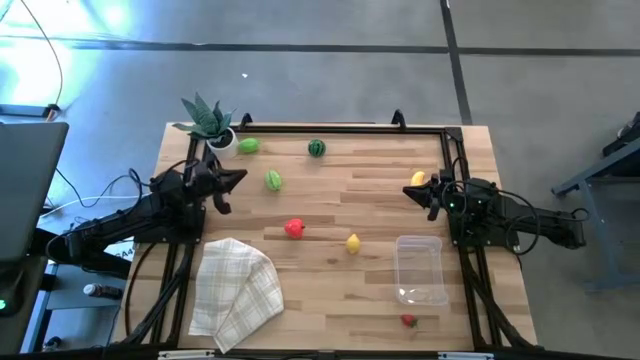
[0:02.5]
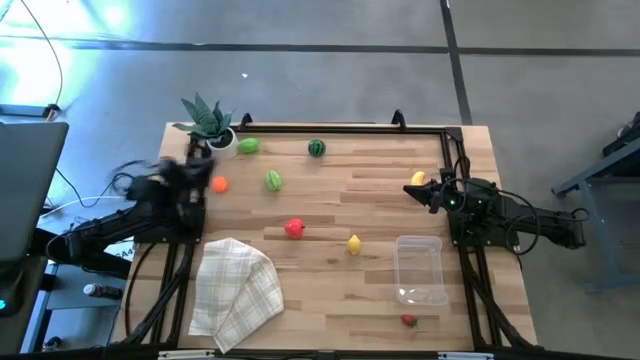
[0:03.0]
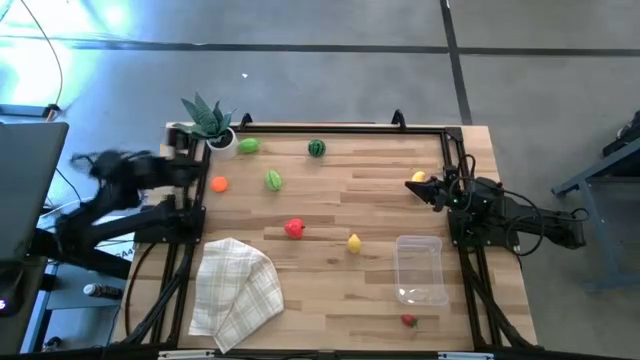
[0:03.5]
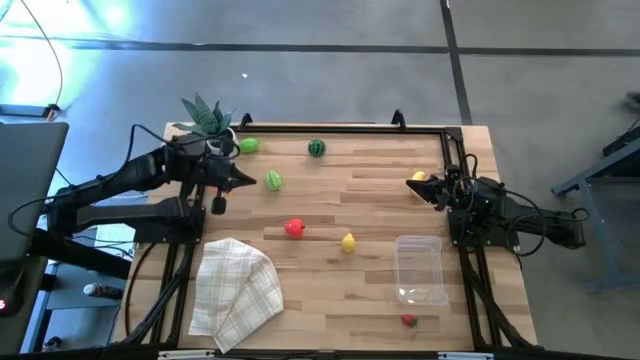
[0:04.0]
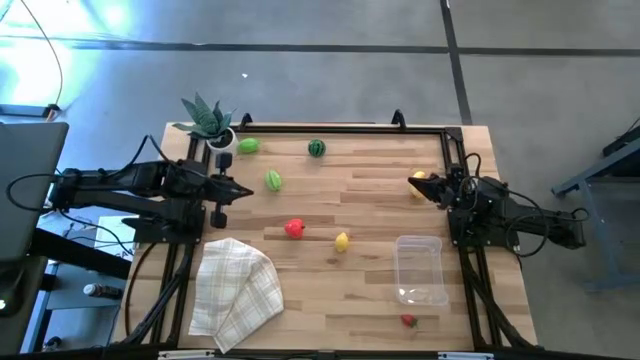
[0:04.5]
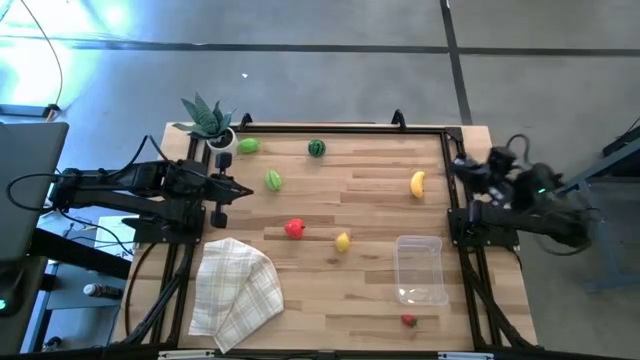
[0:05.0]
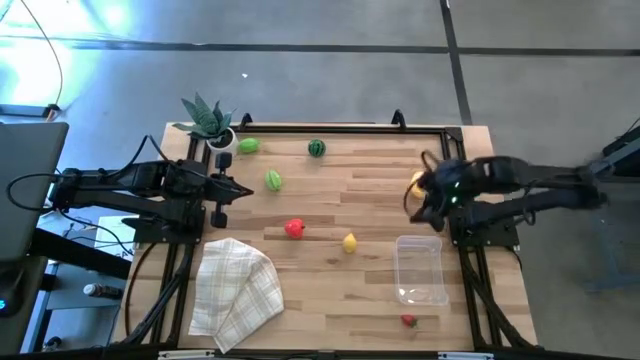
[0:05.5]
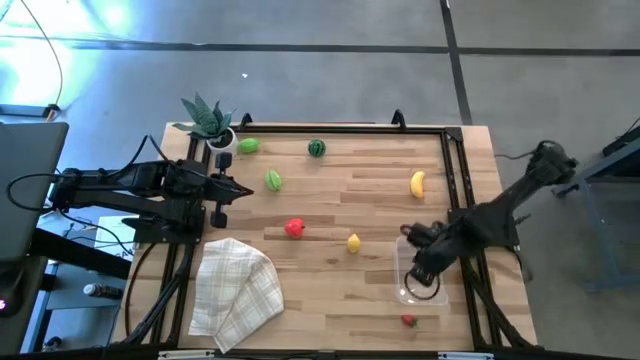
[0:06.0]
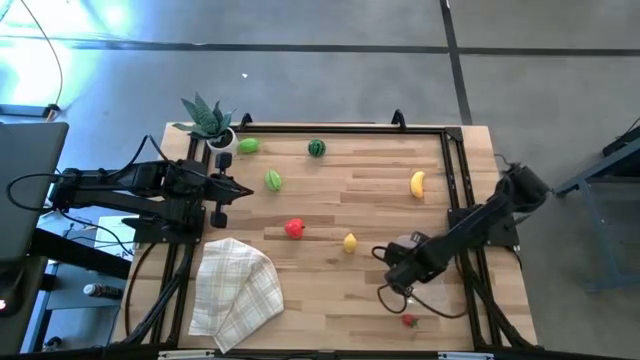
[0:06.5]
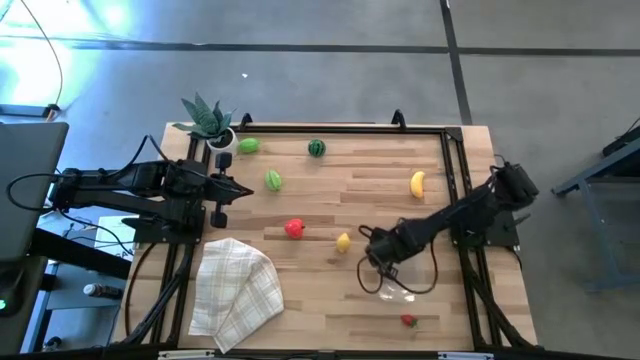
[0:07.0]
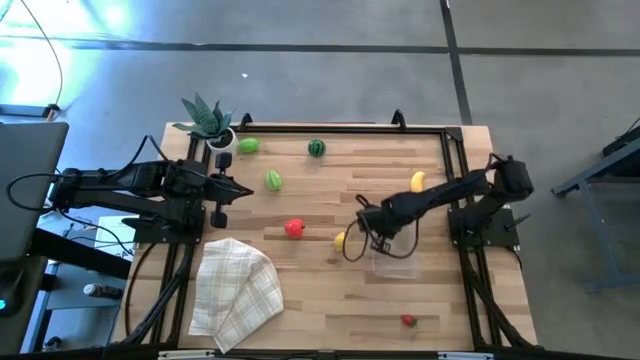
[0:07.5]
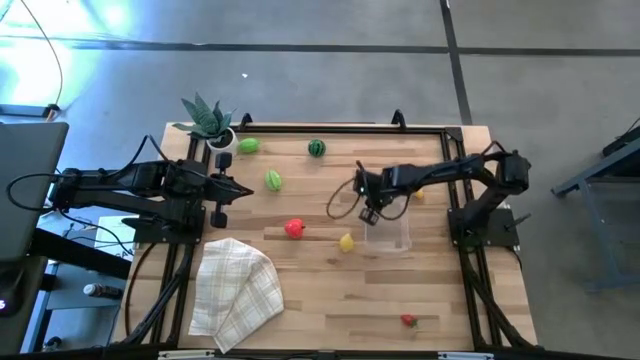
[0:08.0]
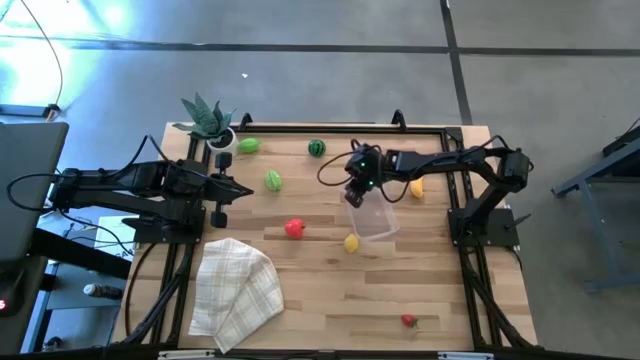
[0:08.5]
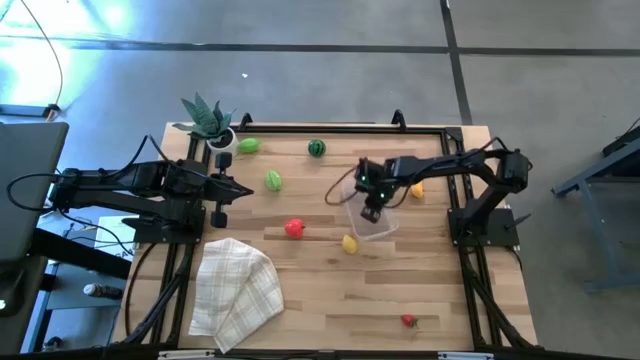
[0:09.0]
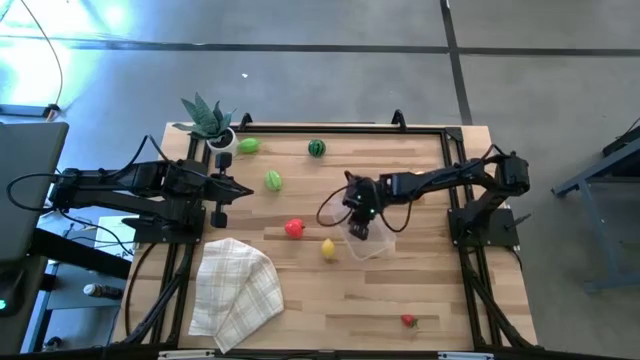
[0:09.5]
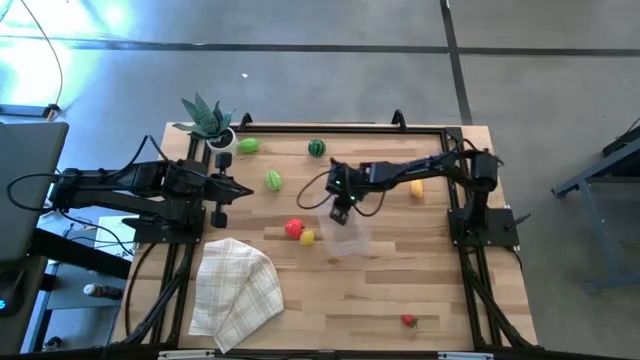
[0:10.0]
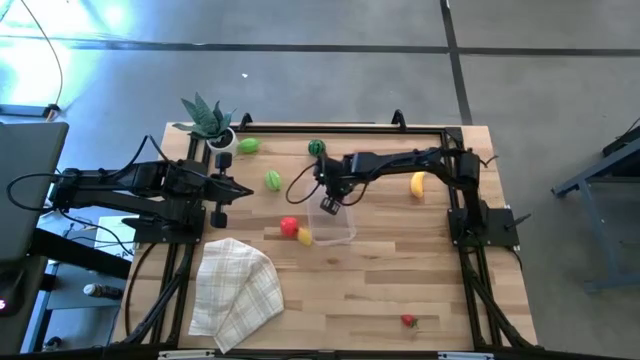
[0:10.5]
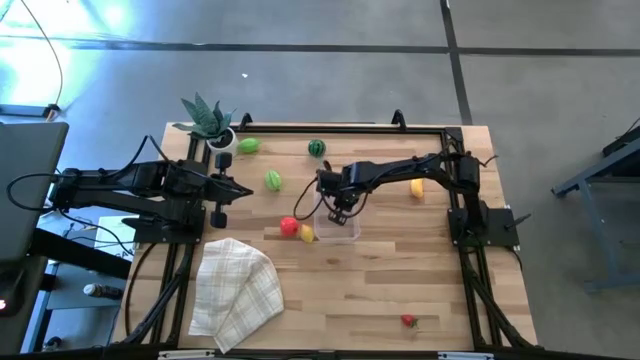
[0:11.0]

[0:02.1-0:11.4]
Task: Pick and placing Produce into tupperware
Move the transparent bin to the center of the table

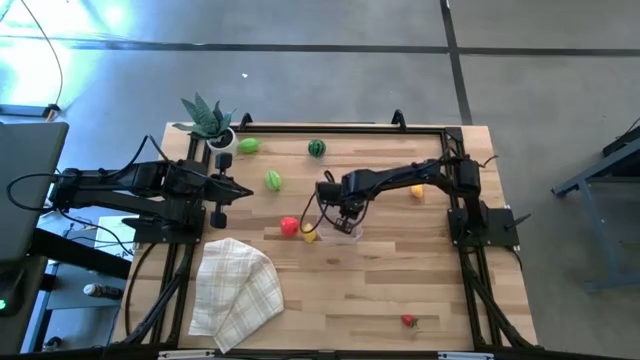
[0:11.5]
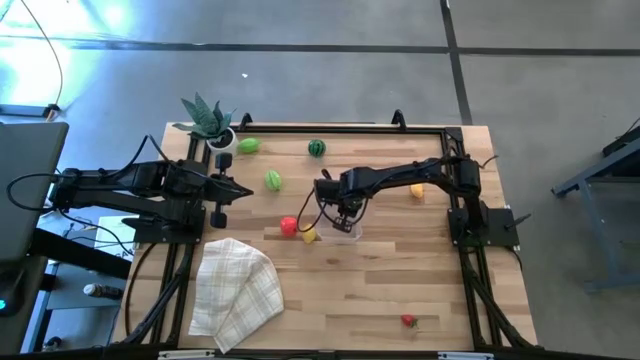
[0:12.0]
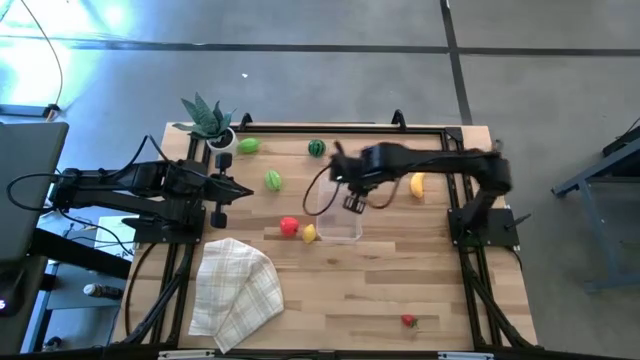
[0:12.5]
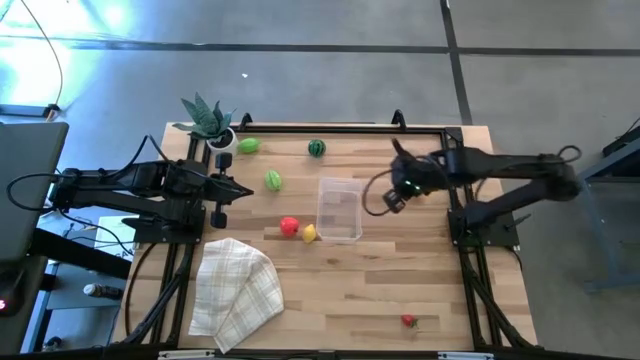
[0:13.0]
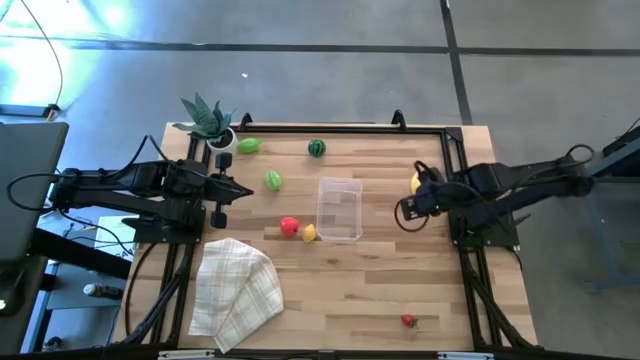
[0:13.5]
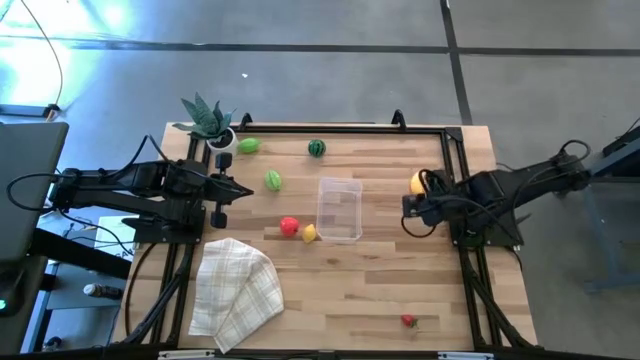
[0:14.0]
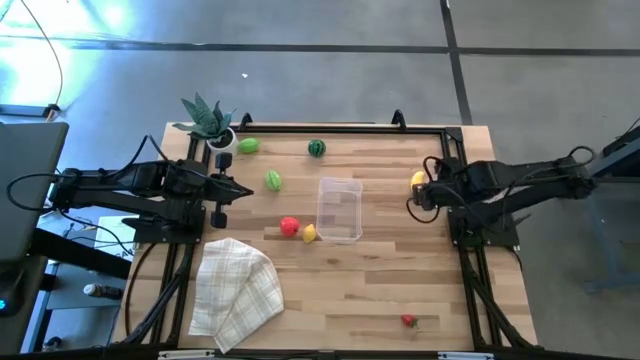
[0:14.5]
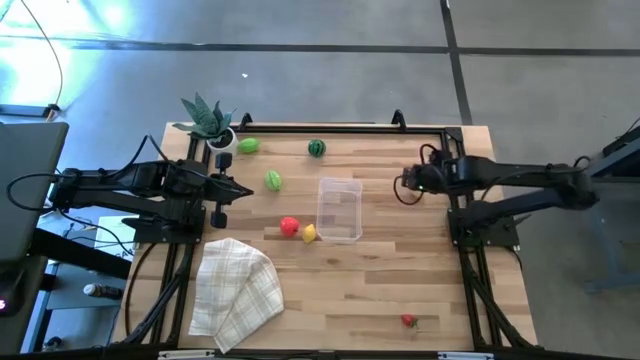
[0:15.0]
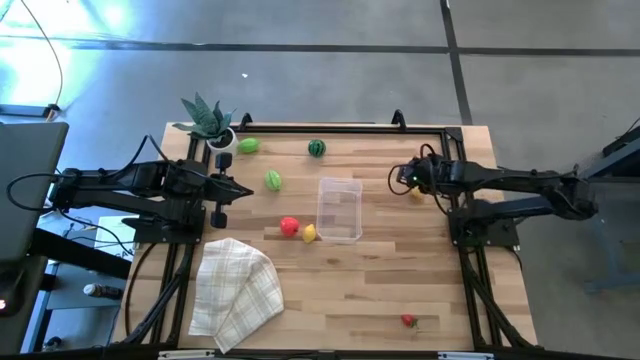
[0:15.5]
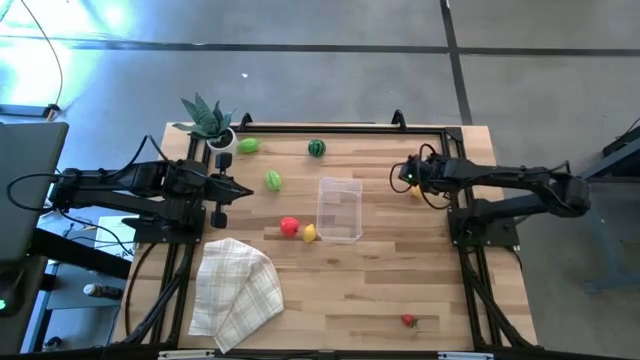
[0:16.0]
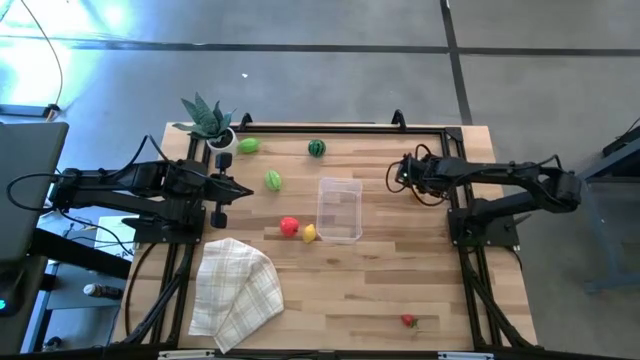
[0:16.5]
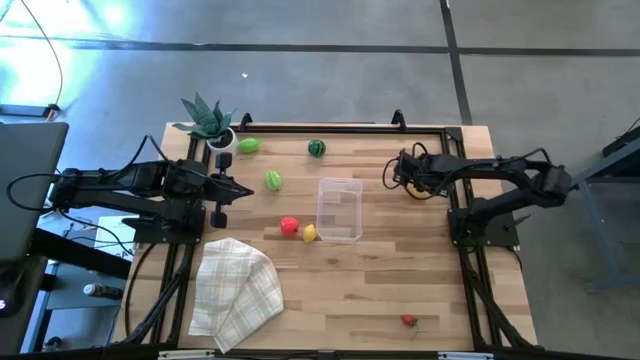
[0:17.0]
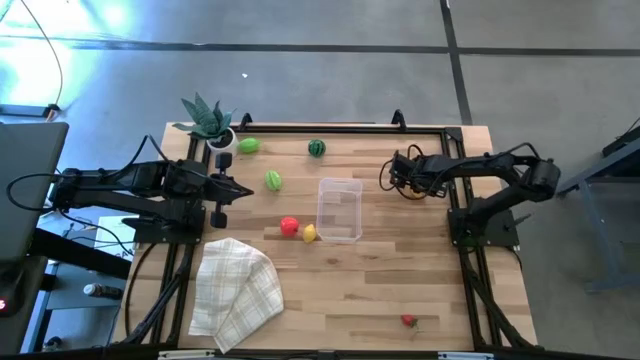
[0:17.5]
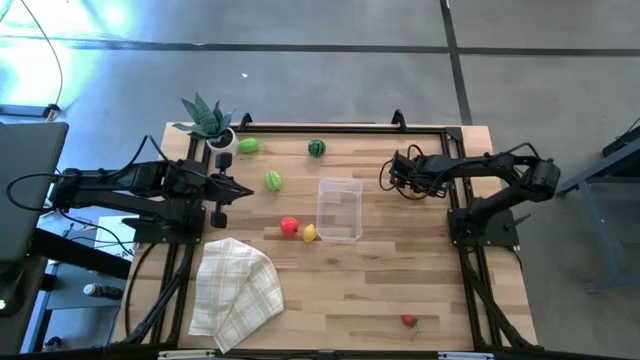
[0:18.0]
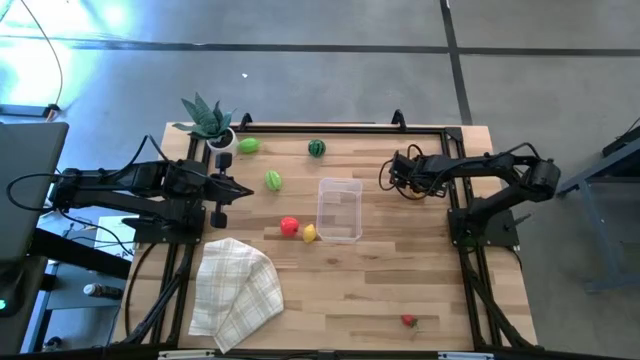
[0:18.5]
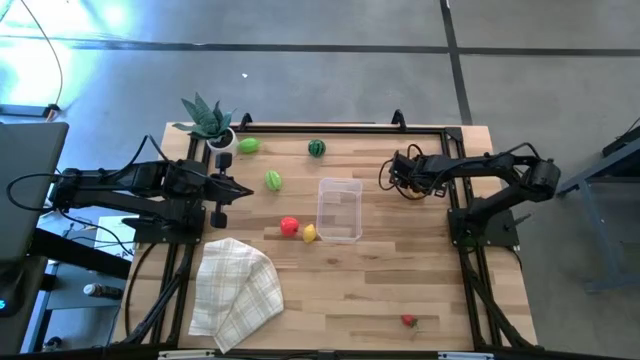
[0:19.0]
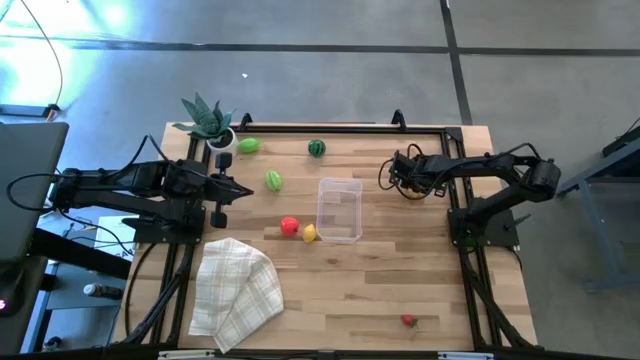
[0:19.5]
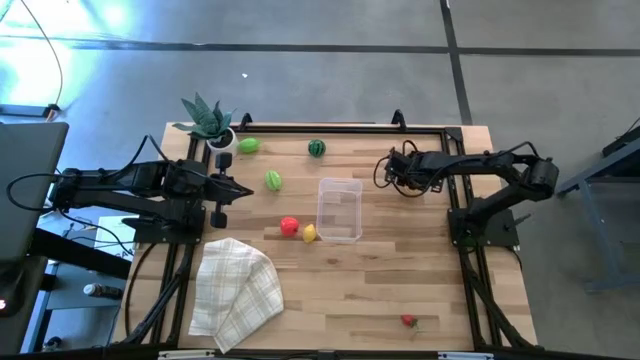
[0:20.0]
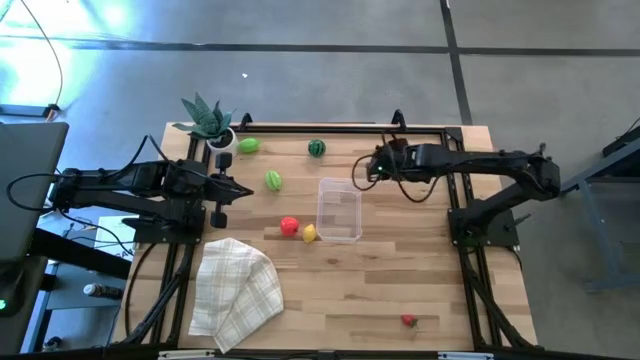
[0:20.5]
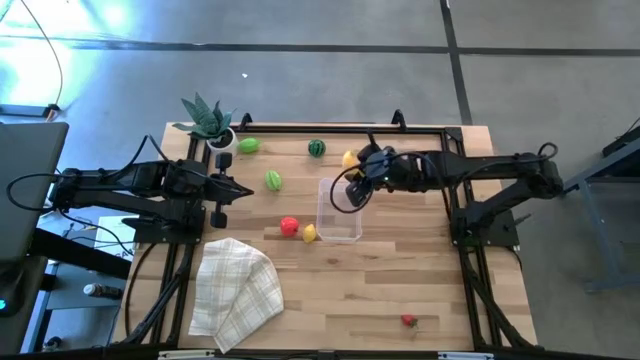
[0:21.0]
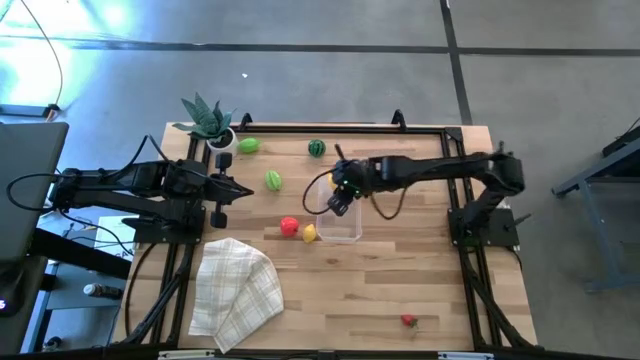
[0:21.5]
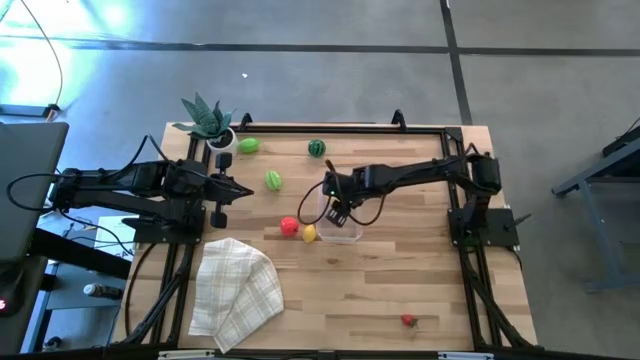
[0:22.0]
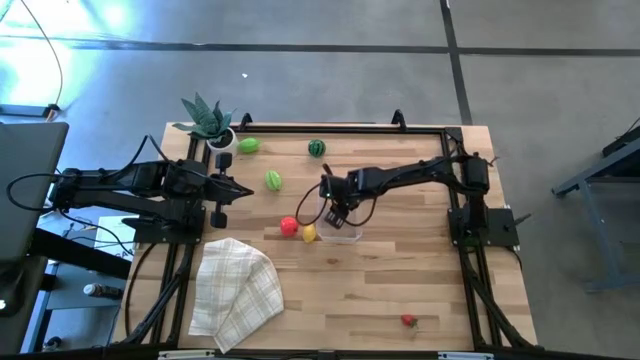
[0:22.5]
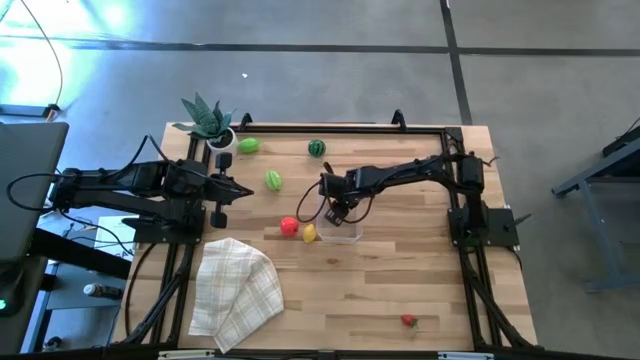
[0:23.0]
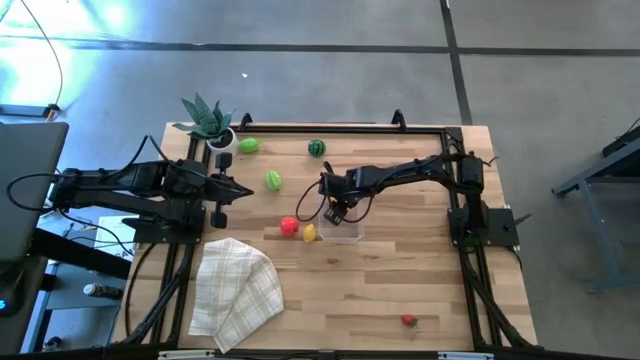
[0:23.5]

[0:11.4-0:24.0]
Put the banana into the transparent bin
